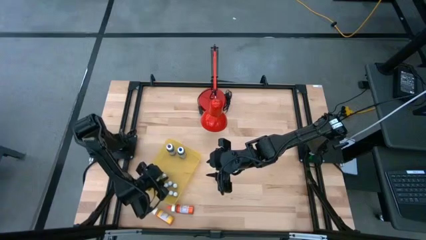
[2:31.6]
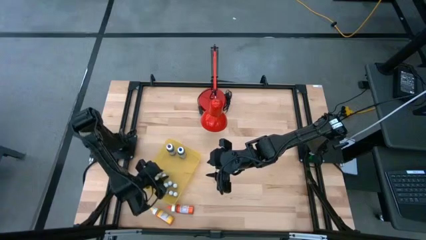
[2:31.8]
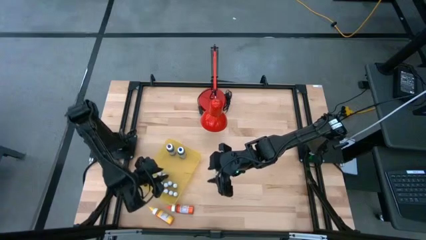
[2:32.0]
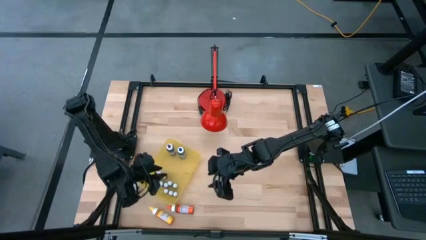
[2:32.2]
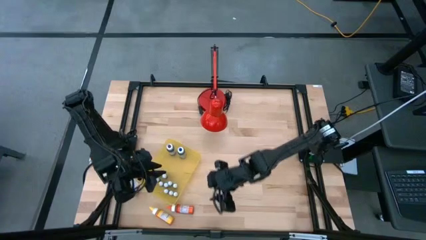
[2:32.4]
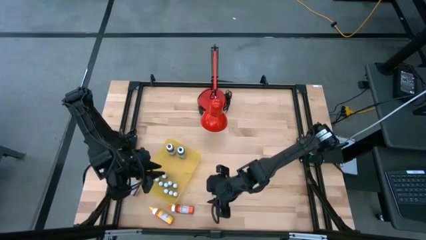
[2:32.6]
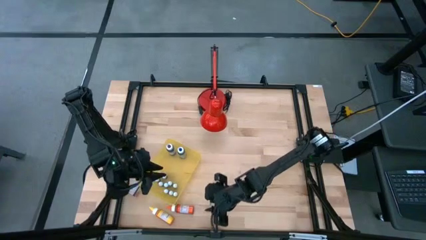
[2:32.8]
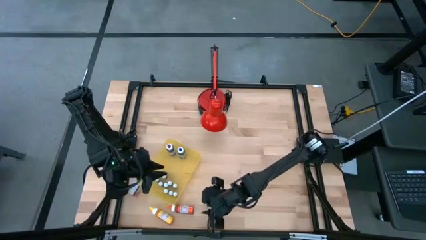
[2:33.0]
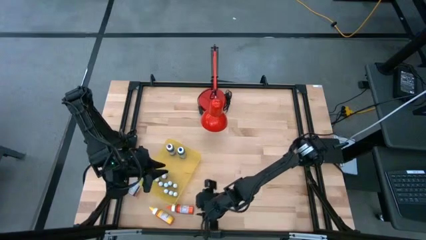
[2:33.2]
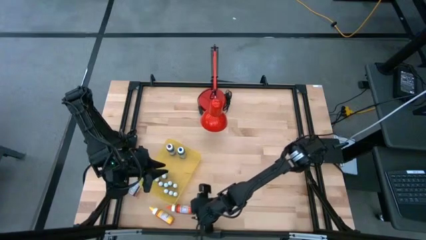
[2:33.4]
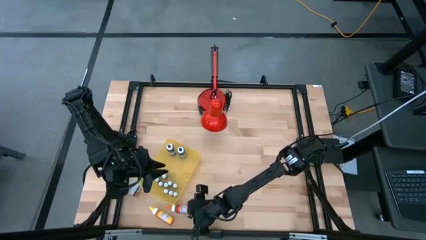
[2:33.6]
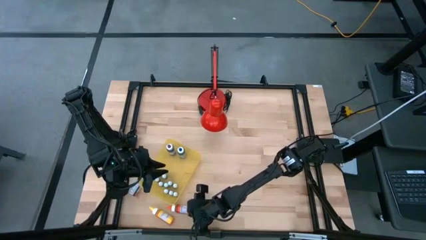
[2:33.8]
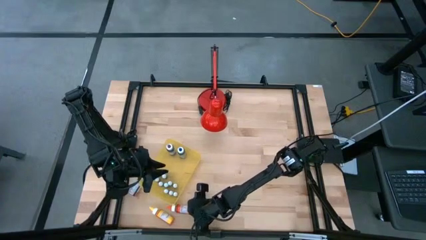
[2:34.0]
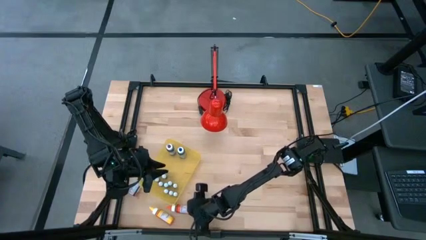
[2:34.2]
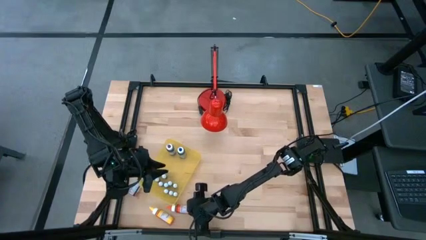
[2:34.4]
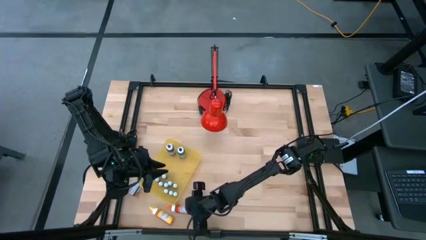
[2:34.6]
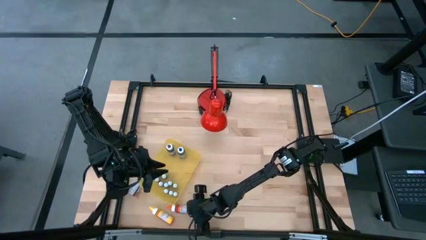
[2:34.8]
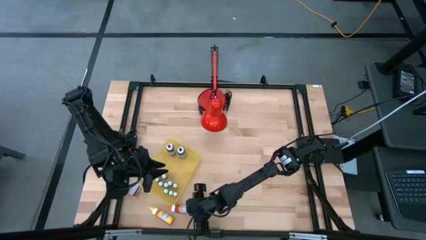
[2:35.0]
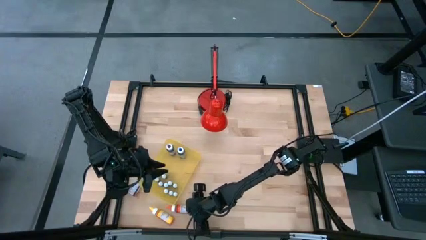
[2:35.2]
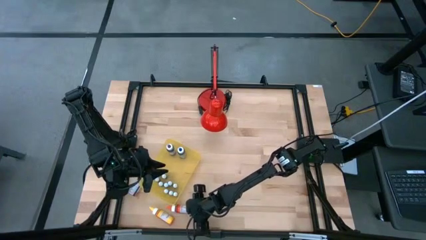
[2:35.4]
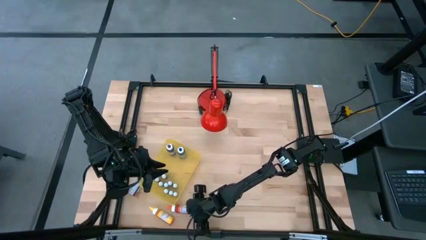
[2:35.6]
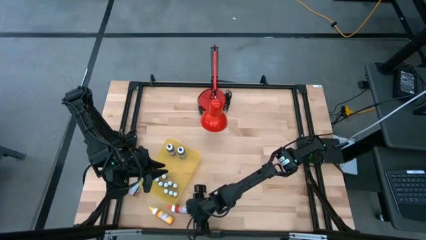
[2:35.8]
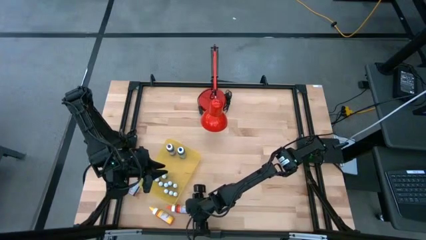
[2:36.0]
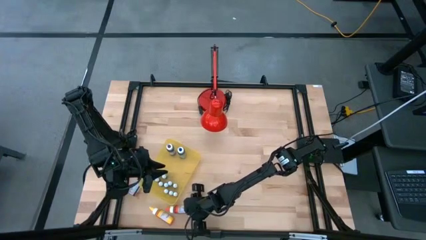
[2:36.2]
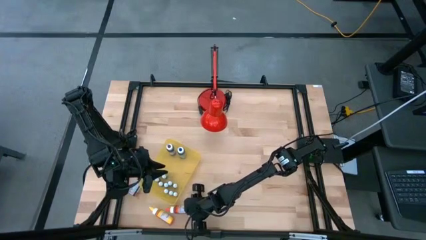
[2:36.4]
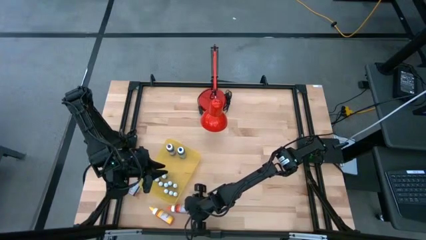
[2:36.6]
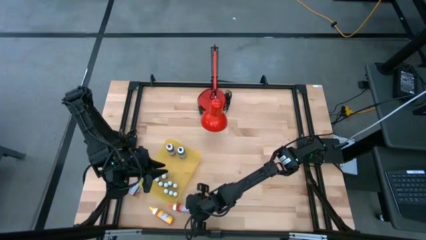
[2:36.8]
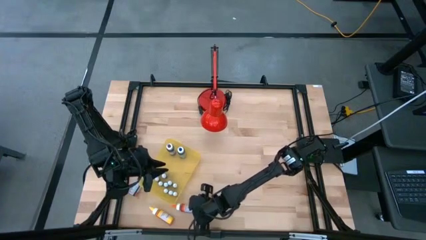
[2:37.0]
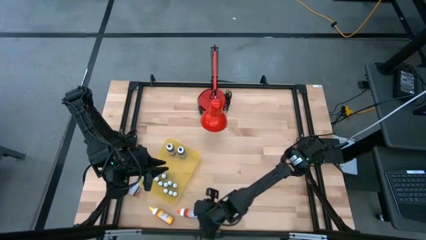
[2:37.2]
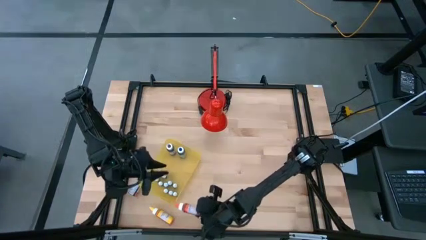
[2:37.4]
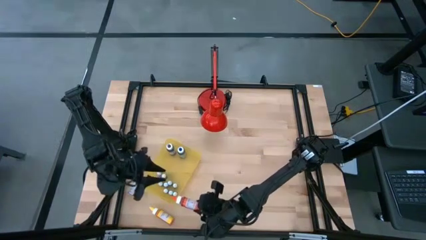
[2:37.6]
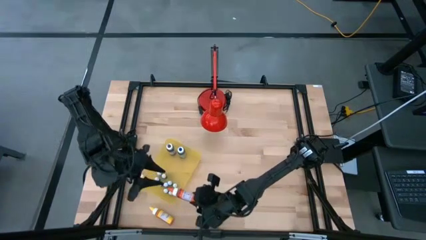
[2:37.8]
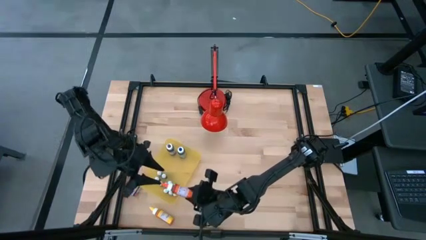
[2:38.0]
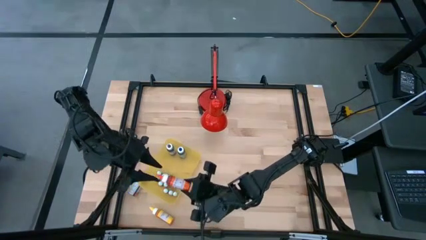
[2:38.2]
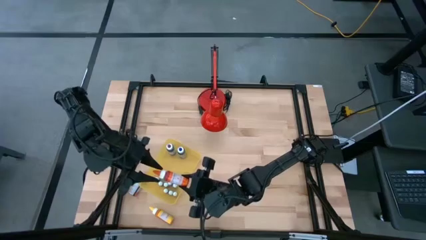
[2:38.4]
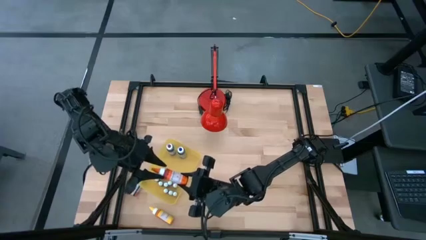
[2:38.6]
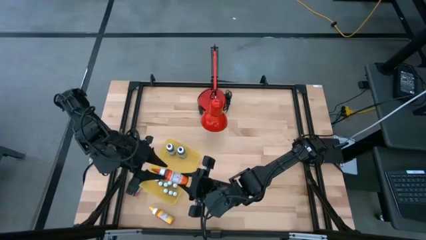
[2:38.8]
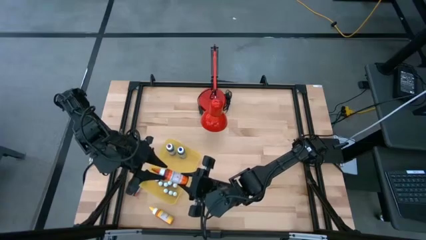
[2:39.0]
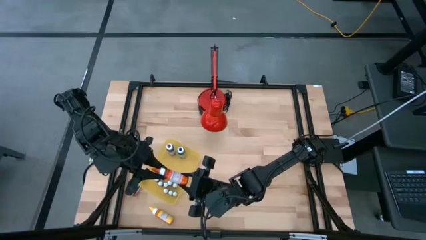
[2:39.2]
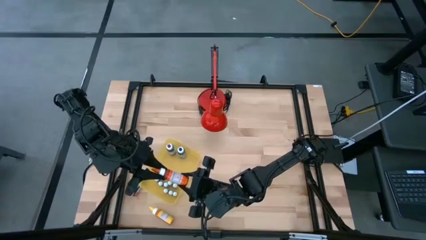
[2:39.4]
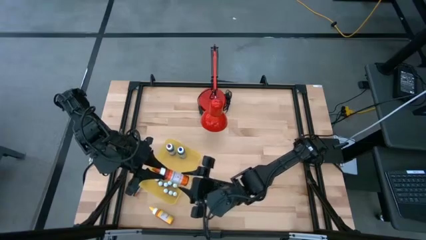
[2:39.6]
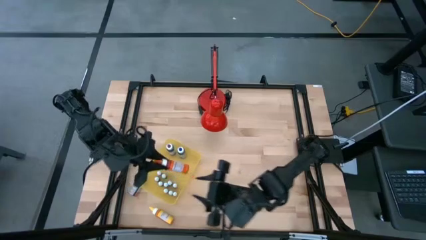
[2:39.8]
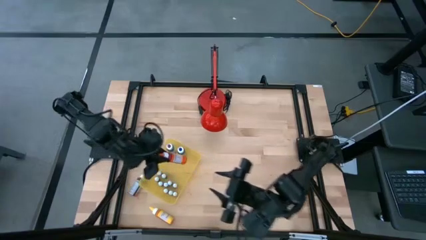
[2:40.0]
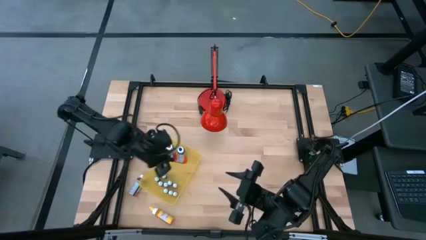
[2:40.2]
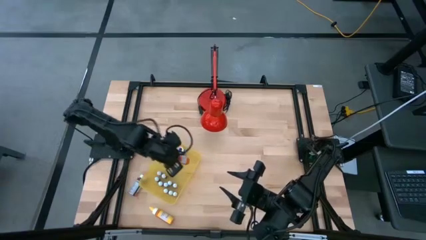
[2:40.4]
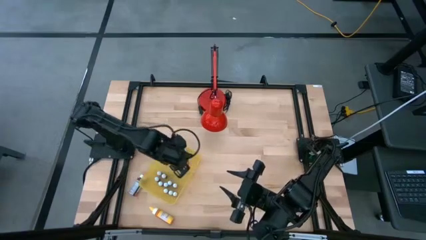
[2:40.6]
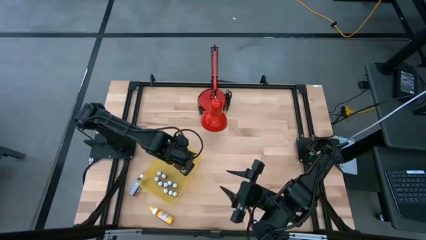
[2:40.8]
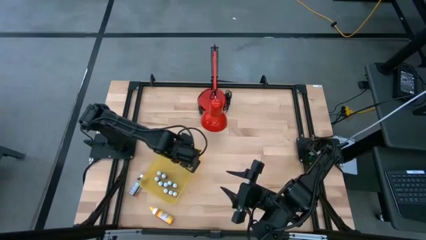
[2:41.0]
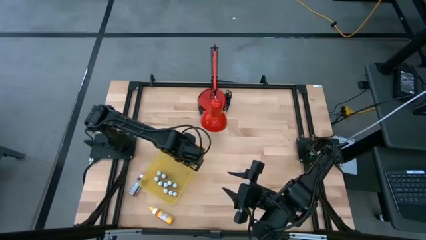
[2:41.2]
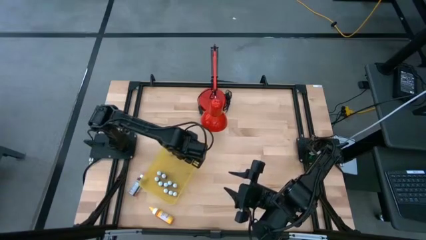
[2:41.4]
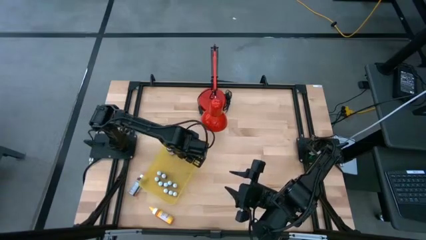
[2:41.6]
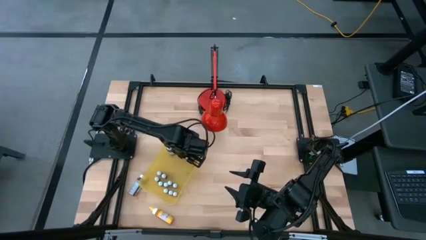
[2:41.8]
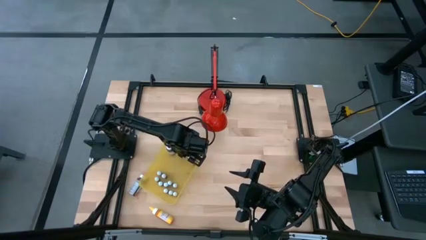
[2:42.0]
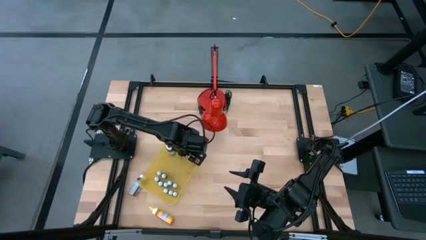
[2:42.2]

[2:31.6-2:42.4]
Task: Pick & Place food coloring
Put the large orange food coloring bottle into the yellow bin

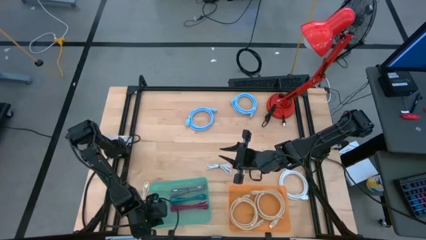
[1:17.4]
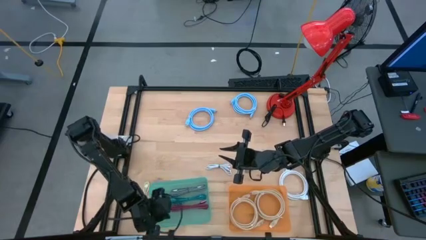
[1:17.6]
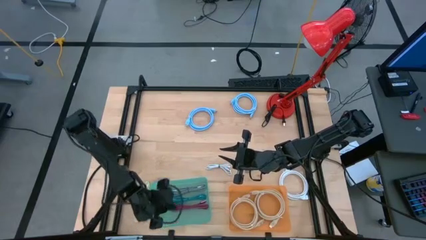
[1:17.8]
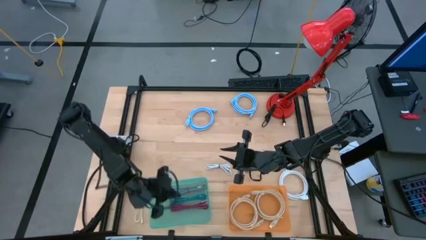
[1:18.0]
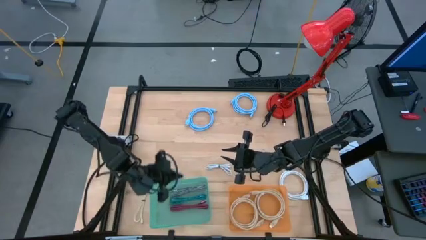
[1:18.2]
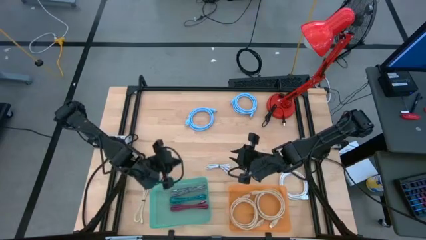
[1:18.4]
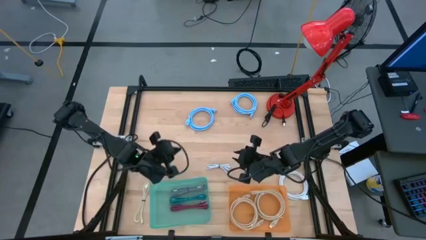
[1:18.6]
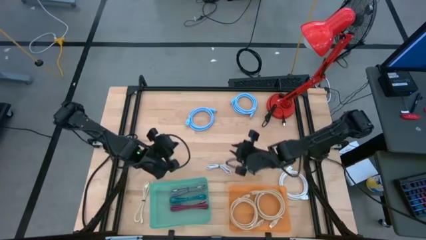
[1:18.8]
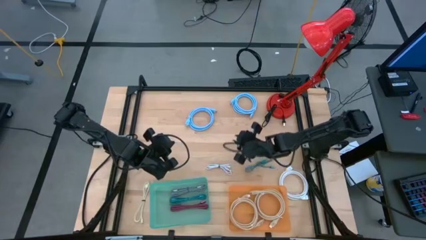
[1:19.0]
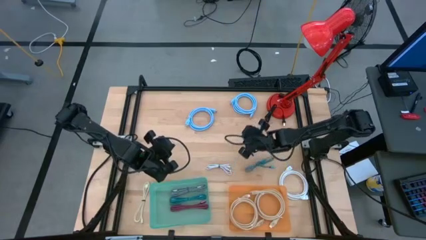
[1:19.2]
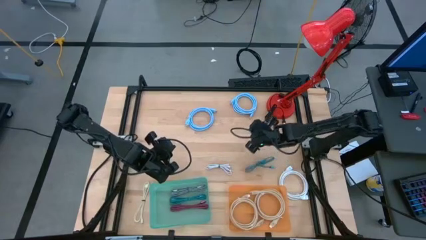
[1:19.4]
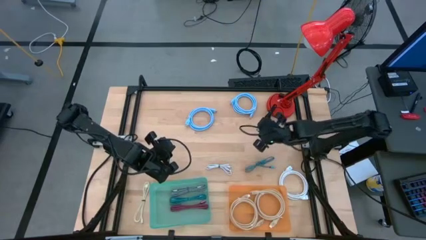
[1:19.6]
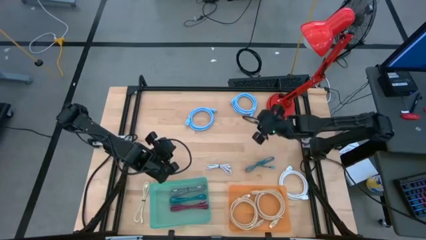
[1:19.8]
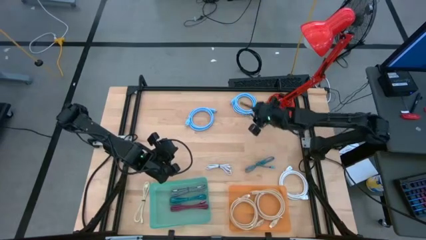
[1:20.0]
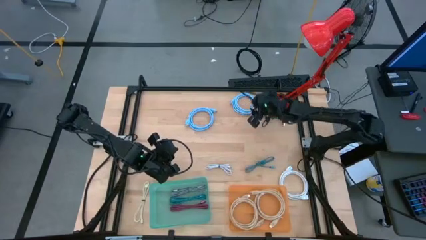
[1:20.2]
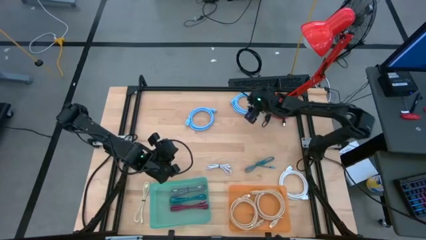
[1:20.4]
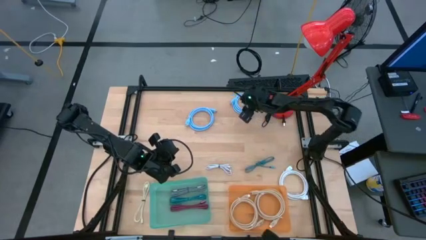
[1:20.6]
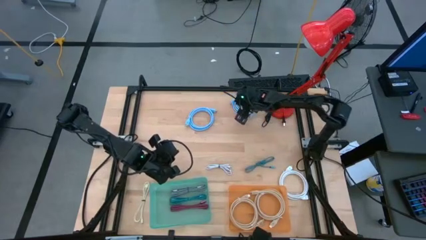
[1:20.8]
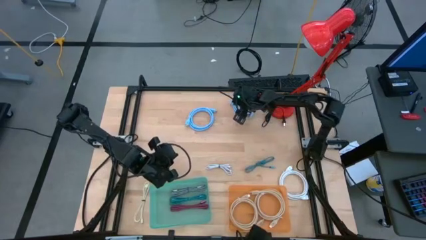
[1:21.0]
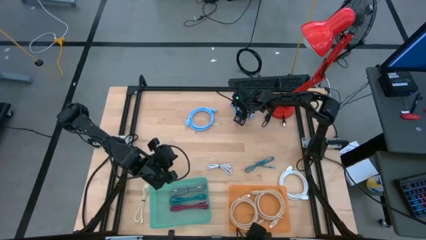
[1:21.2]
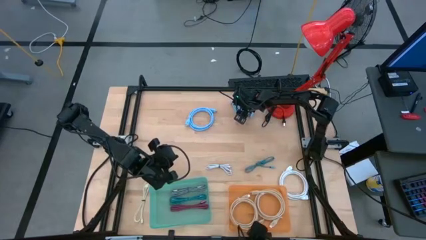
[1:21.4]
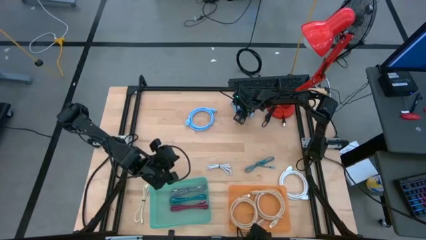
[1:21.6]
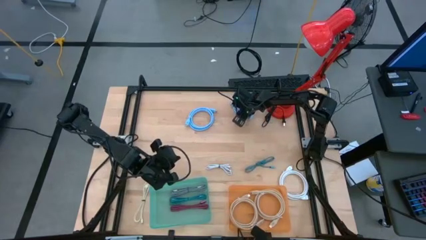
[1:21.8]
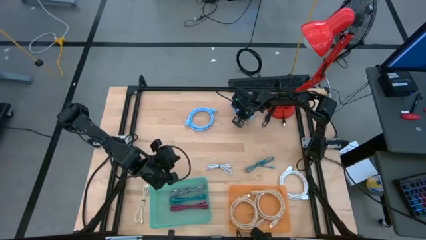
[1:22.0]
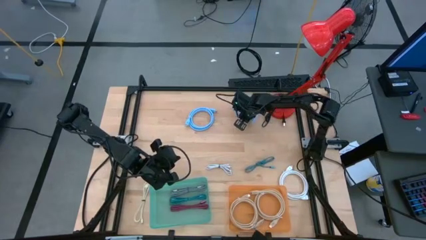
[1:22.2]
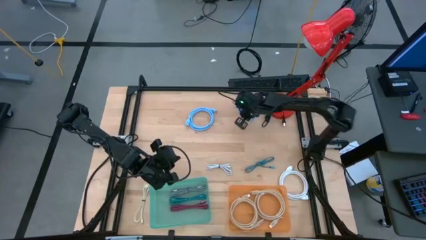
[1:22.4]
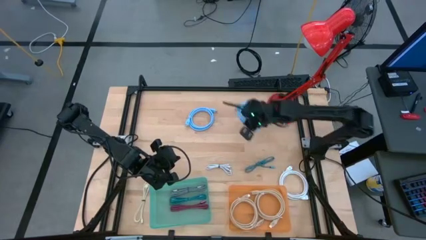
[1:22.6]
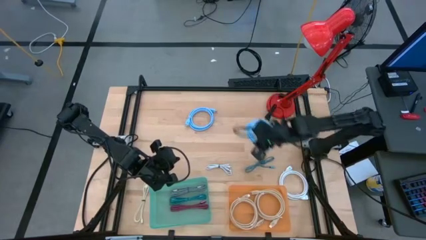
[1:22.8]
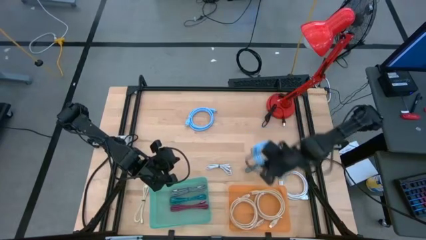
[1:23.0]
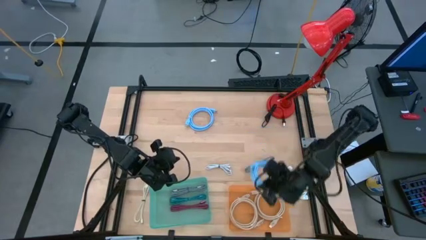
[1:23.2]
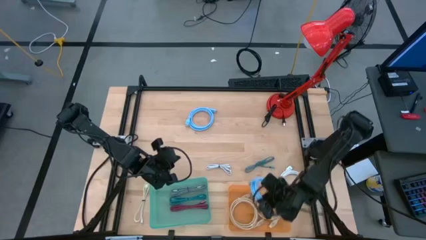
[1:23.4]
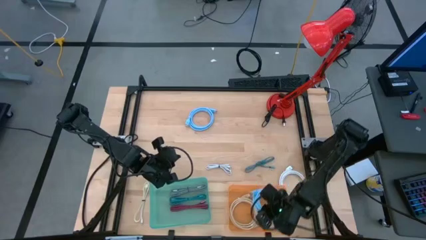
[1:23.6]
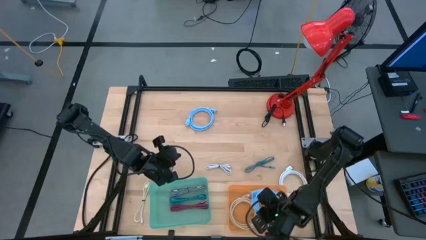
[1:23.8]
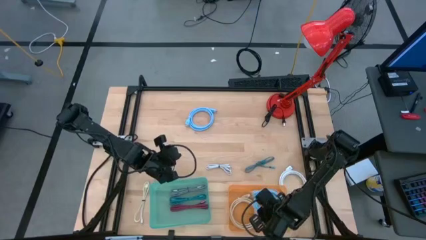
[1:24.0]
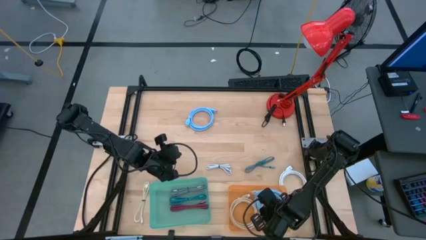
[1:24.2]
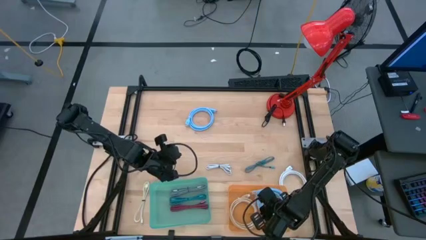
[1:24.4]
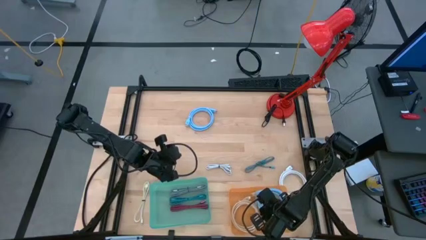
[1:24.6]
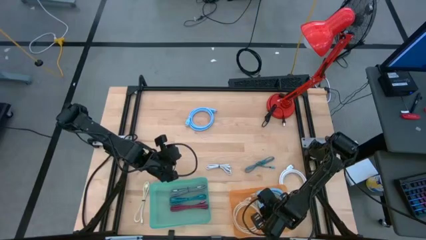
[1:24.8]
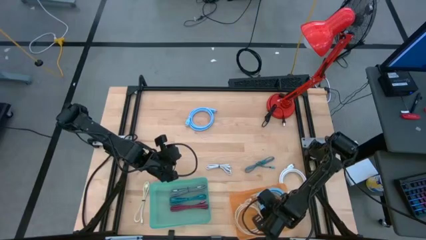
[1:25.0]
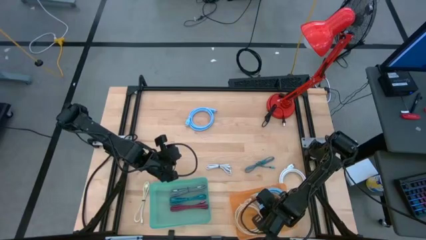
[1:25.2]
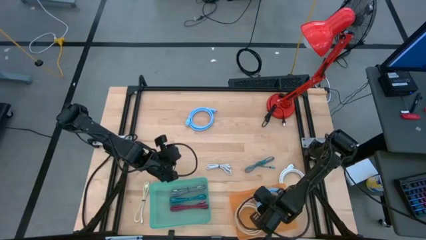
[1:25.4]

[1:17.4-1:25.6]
Task: Pick & Place USB Port
Put the right light blue HDMI cable into the orange bin
